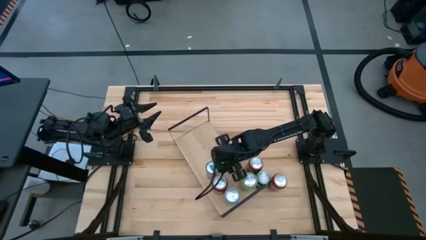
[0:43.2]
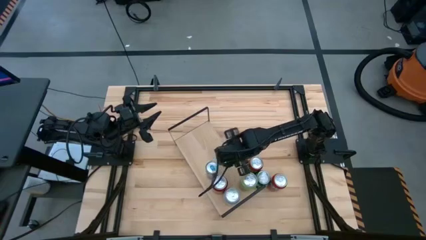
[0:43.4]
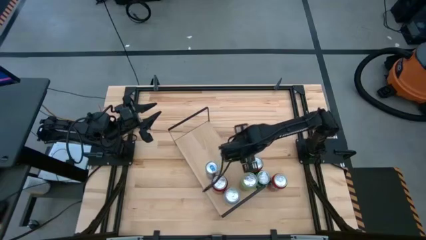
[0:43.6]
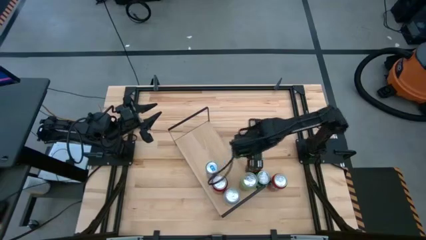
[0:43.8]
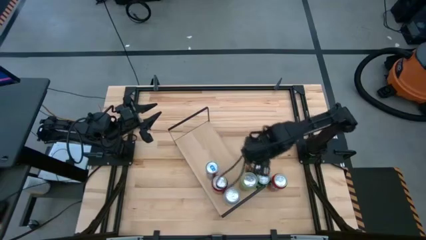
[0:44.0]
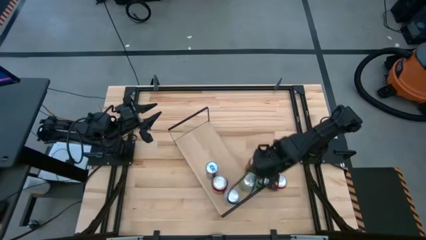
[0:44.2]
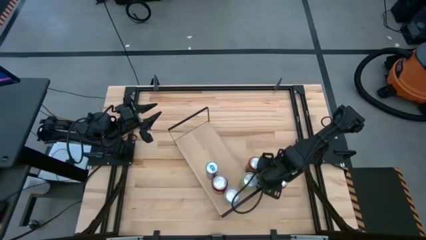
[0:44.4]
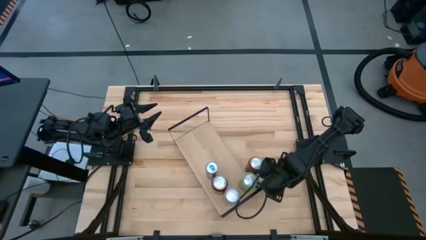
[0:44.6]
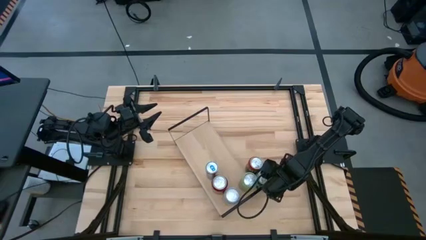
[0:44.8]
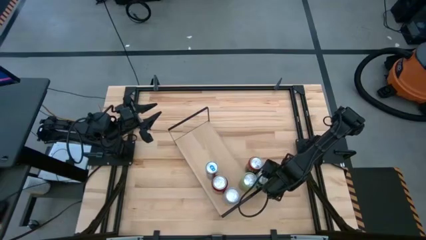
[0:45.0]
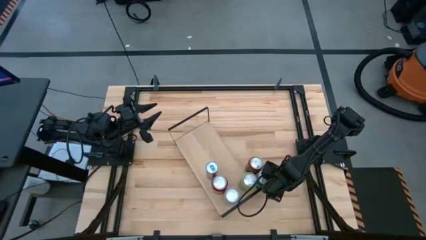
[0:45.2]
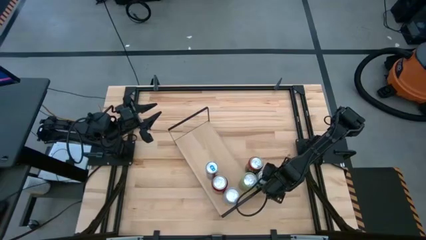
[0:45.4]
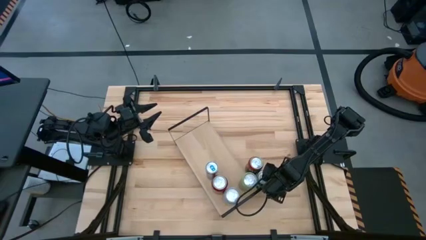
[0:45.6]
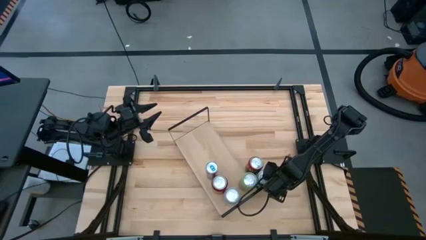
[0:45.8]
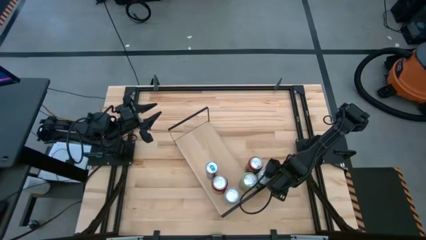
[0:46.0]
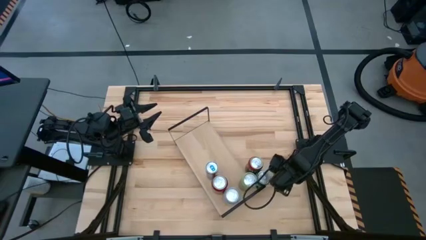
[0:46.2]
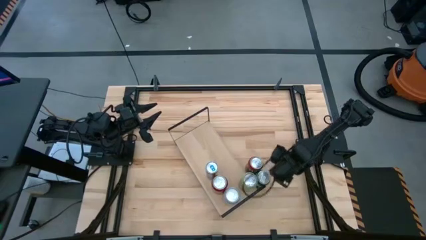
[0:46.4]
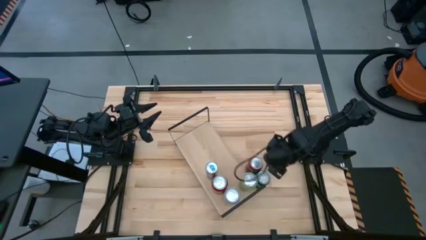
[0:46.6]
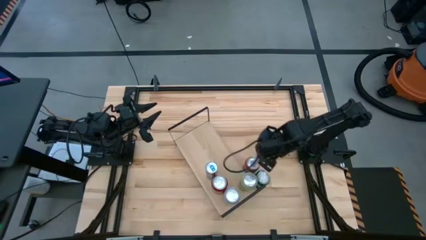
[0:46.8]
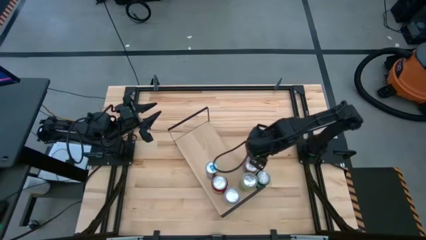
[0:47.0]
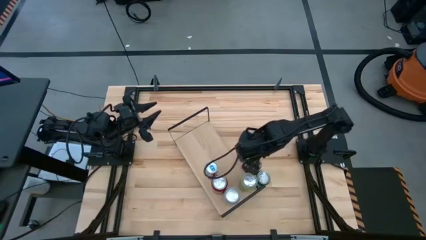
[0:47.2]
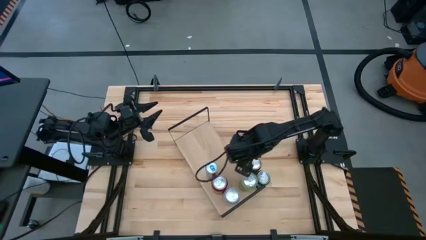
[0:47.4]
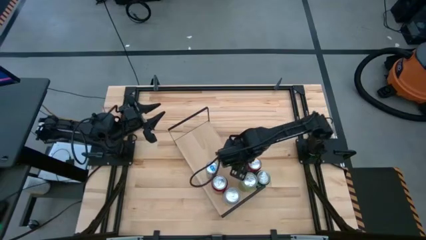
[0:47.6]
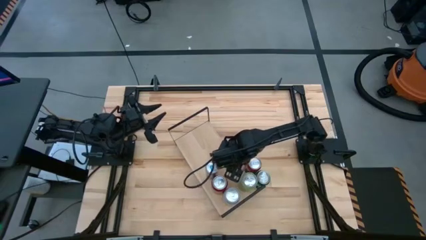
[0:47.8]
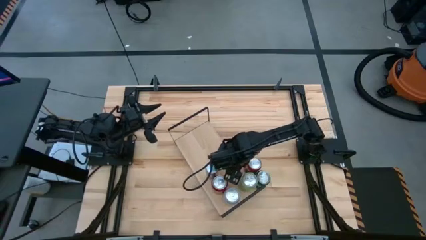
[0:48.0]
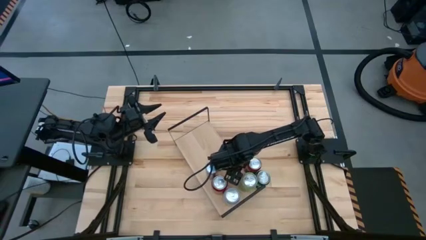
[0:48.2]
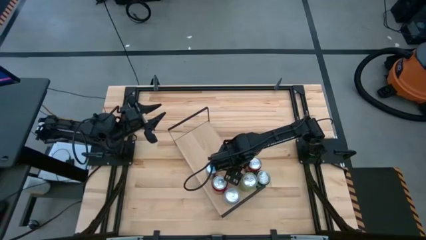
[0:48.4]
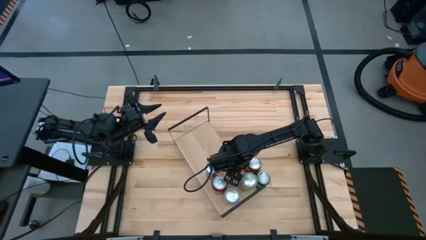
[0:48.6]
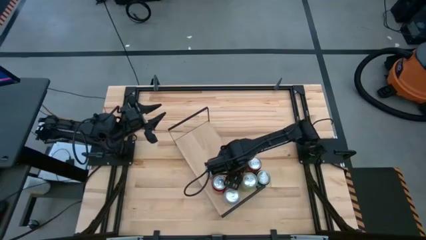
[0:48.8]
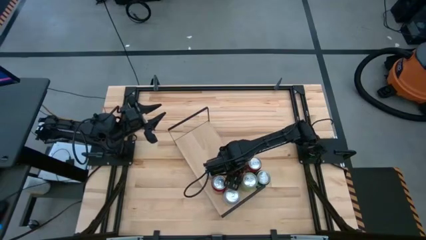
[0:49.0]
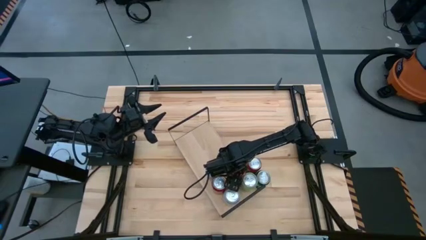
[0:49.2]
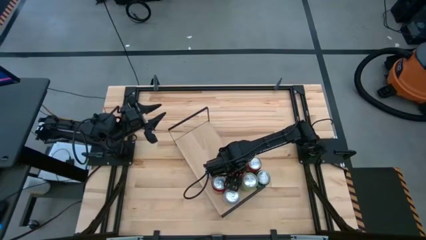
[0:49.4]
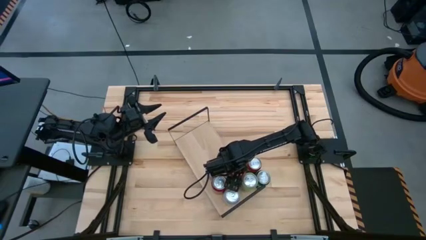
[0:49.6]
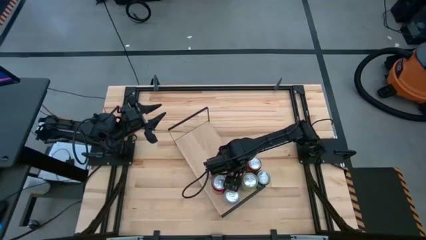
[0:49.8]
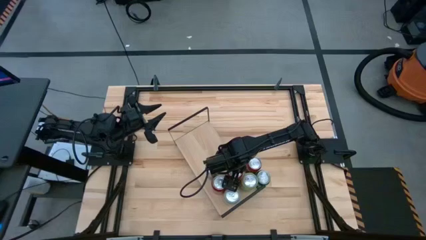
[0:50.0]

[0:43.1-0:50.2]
Task: Place canned beverage on shelf
Put the orange soda can on the shelf

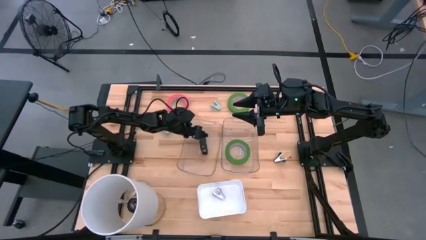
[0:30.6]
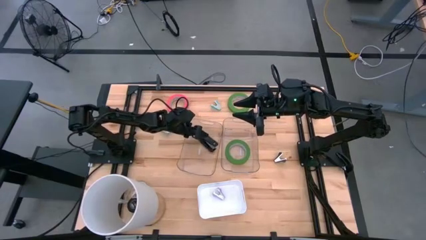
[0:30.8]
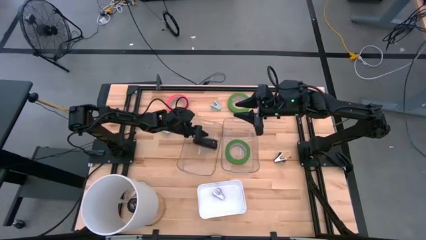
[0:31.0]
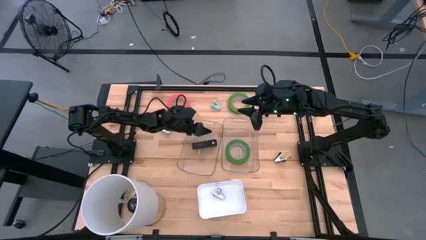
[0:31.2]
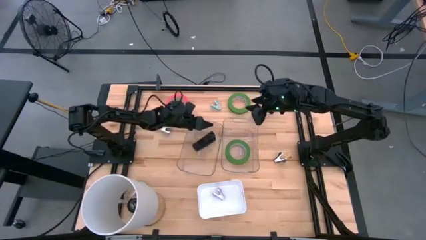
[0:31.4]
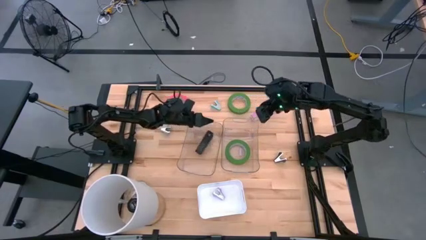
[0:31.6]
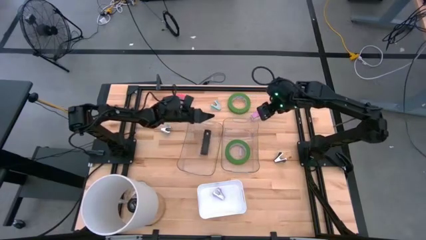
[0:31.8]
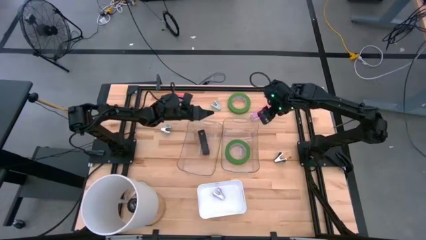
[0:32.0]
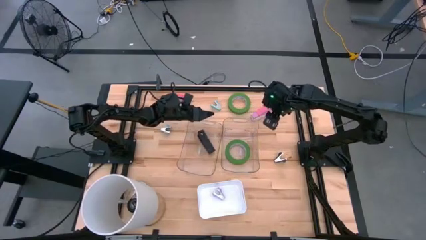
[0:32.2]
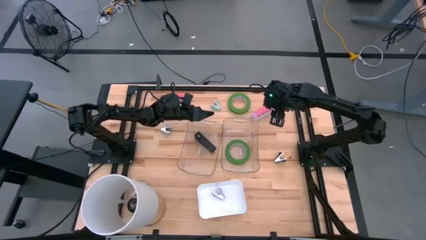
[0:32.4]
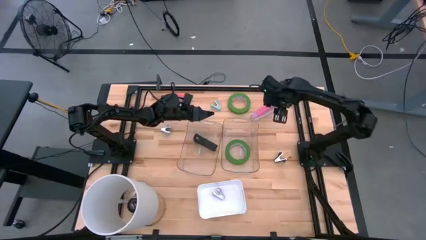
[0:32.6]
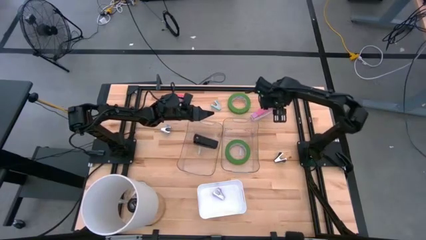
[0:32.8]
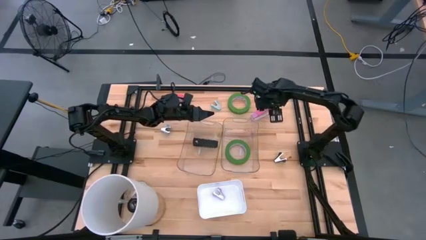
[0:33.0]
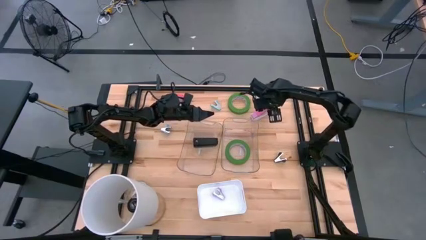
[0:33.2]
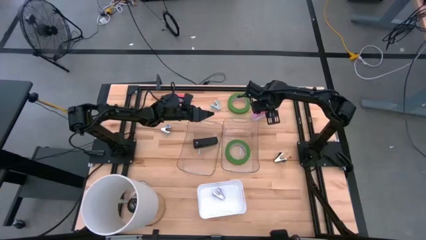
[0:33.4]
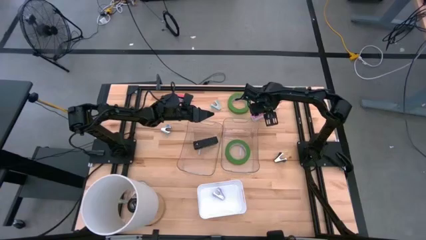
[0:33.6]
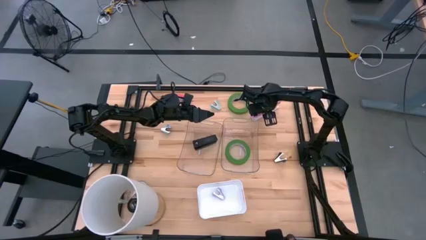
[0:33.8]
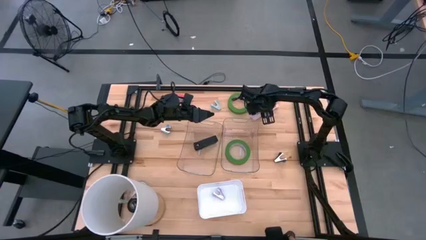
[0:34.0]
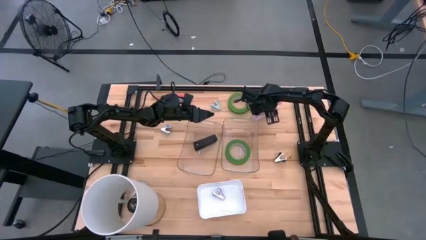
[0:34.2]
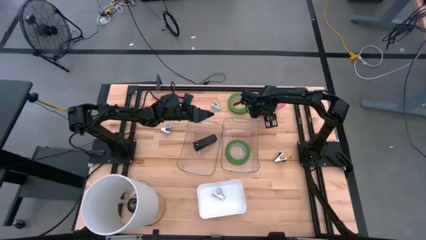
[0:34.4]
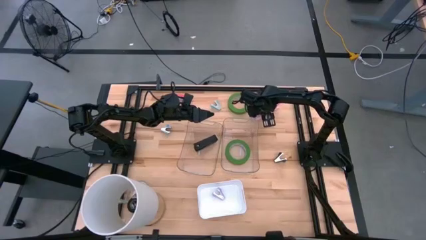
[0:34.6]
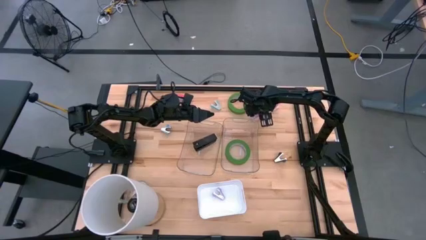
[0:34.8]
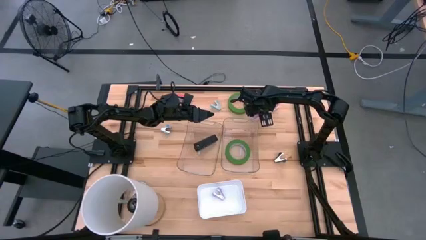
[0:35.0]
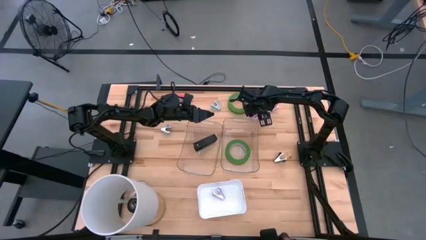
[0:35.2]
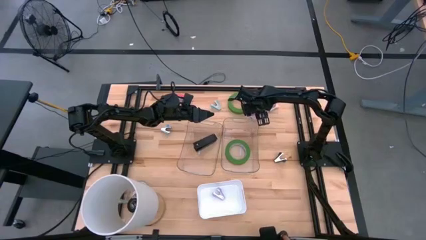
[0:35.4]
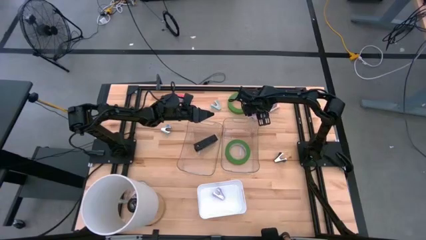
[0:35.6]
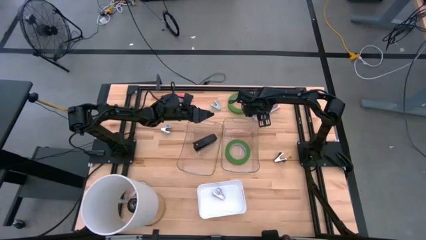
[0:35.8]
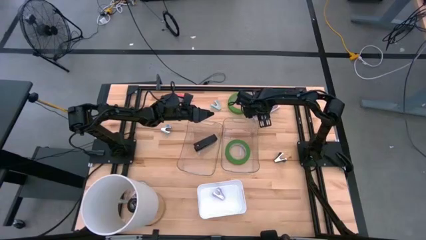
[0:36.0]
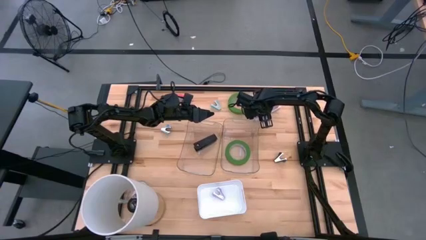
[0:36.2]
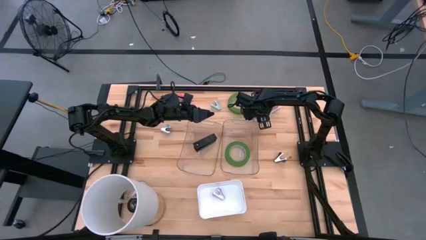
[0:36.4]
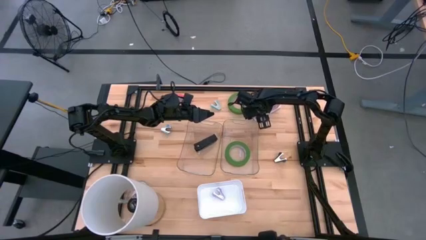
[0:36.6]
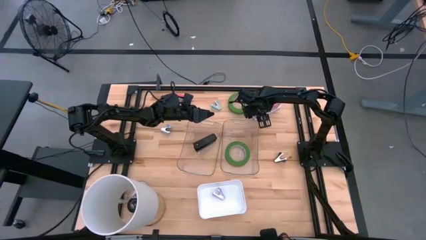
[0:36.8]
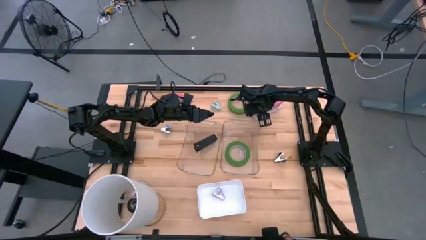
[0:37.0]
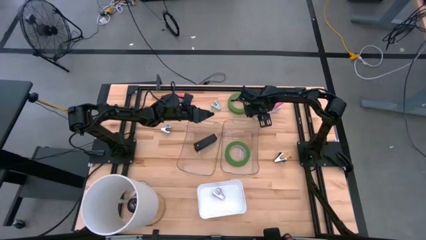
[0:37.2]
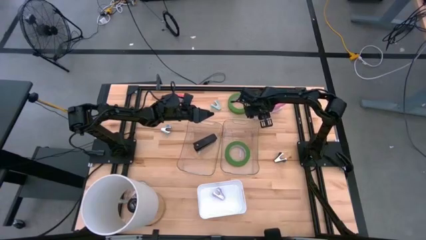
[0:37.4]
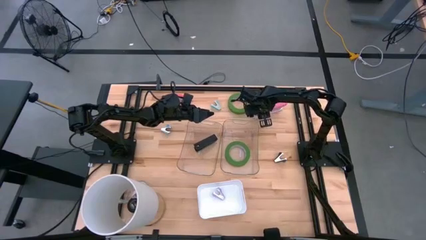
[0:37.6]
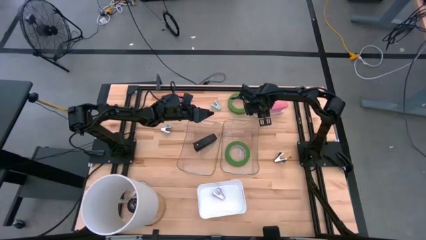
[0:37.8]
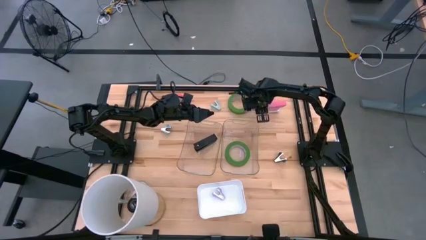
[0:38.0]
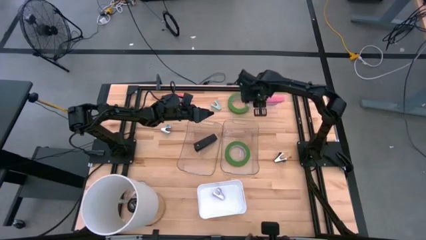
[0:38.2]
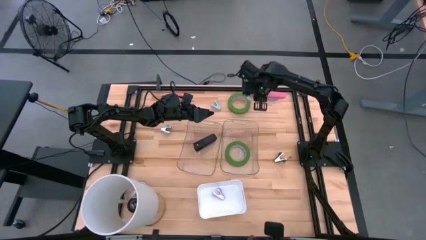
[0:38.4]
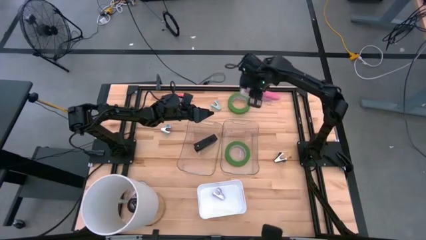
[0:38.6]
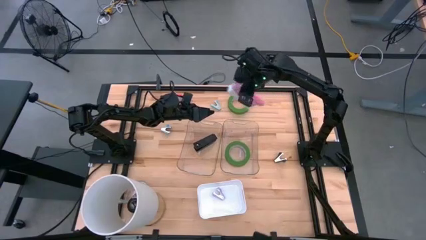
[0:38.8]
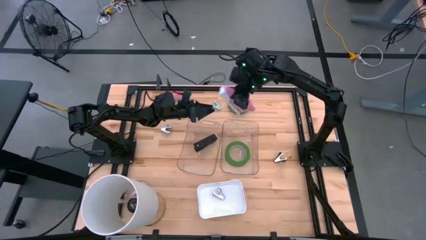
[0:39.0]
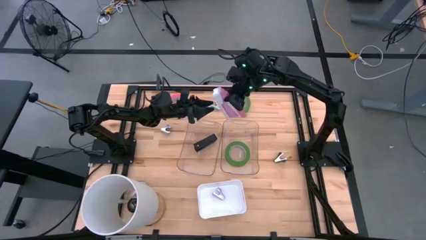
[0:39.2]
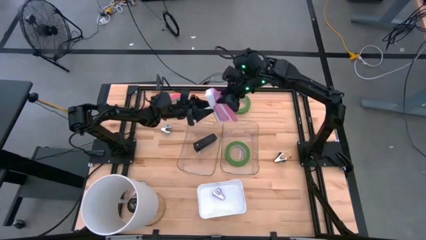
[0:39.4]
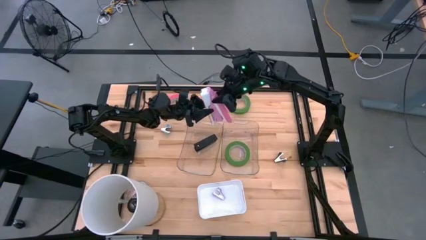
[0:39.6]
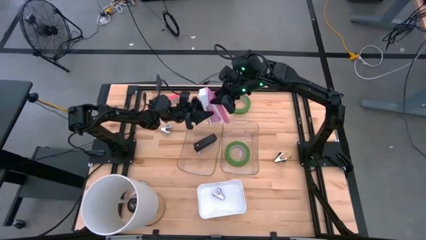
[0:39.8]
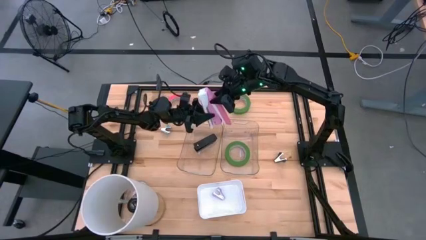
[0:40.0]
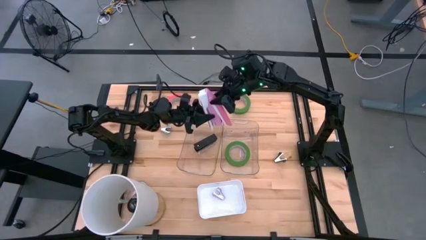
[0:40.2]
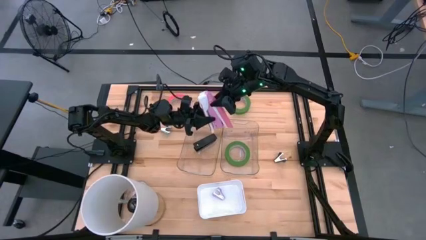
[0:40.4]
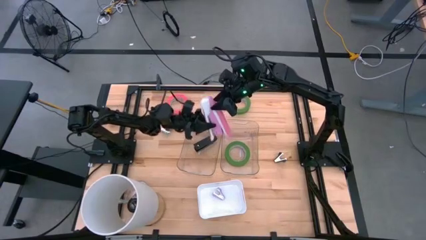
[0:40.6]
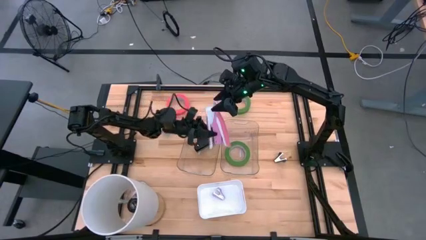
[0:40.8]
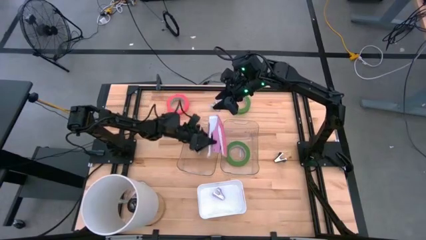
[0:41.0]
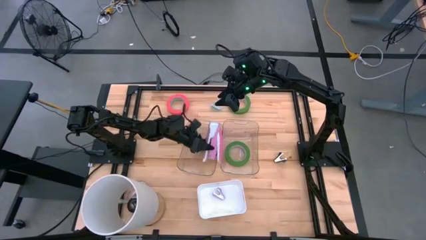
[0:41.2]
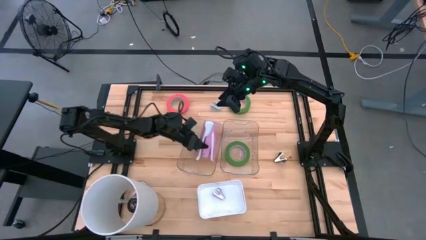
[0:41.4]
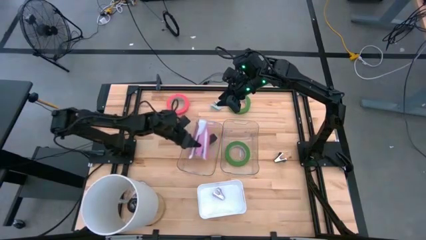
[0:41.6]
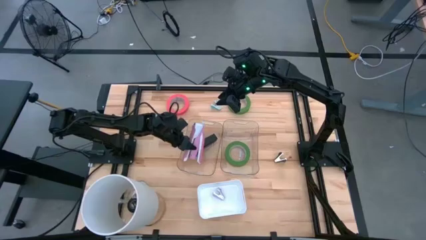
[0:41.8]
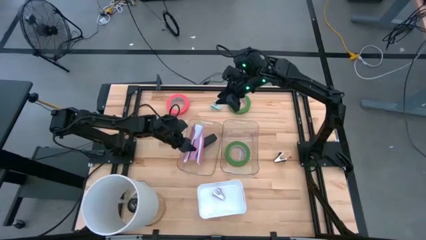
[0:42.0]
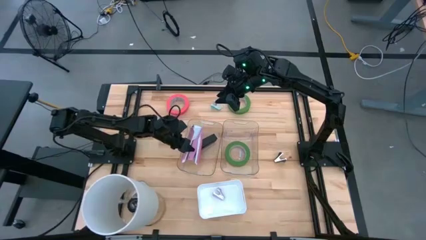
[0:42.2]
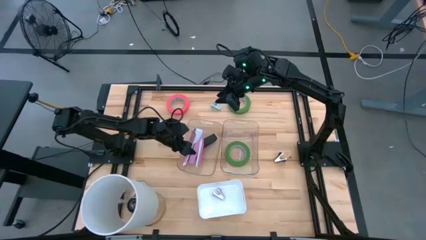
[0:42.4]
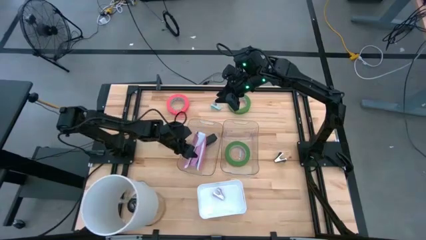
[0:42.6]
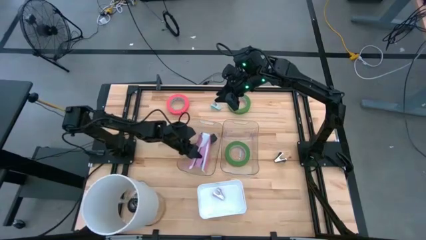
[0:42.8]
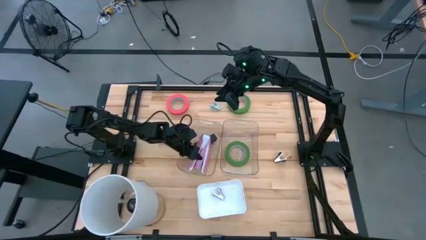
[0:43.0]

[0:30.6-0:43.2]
Task: Pick and place Stapler, Stapler remover, tape
Put the pink stapler into the left transparent bin
